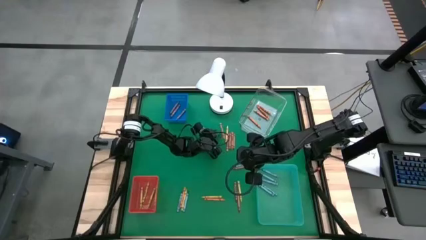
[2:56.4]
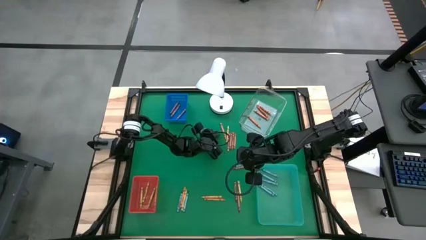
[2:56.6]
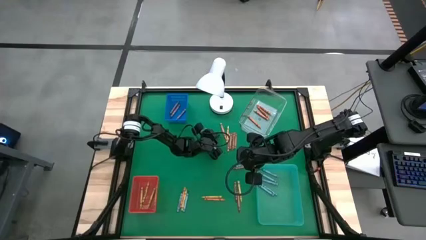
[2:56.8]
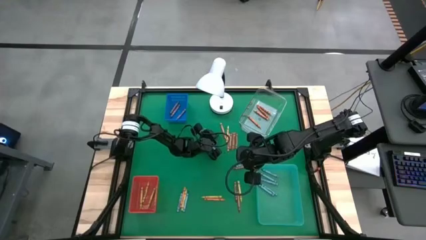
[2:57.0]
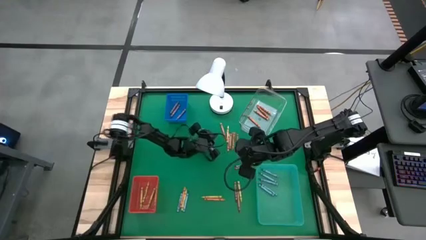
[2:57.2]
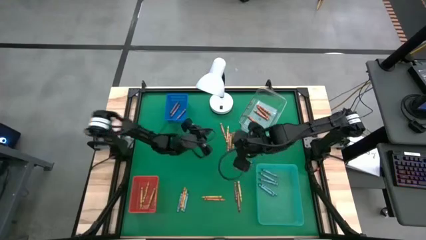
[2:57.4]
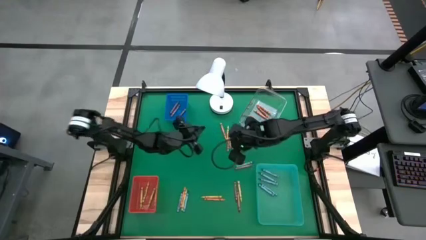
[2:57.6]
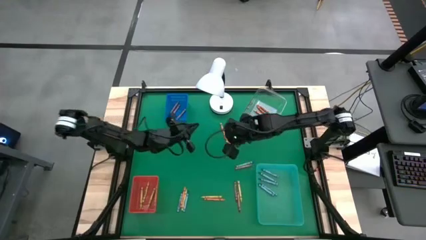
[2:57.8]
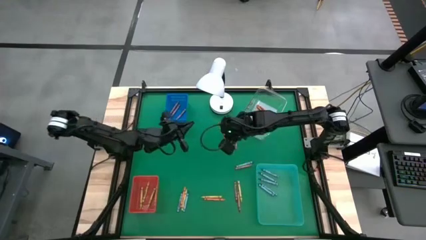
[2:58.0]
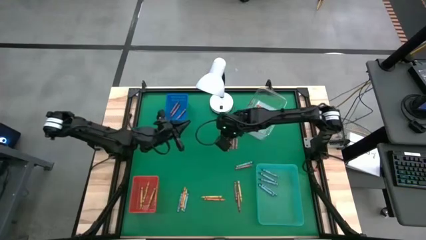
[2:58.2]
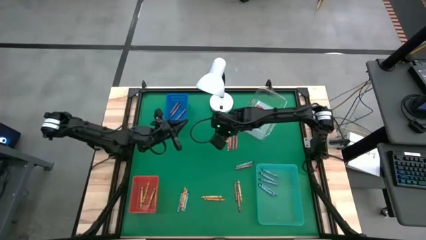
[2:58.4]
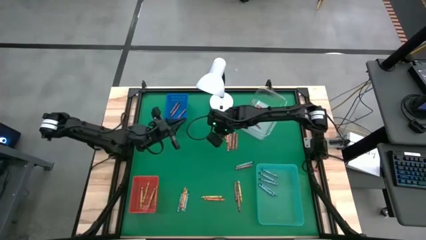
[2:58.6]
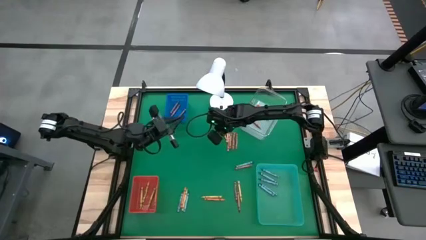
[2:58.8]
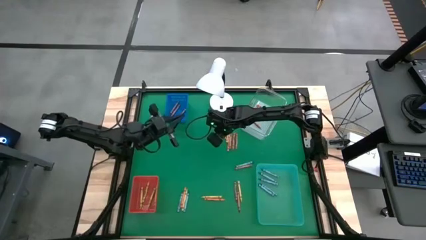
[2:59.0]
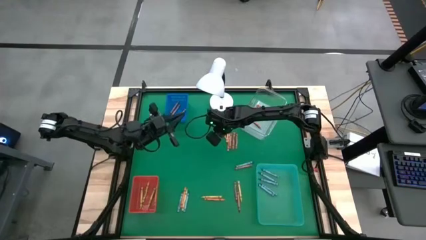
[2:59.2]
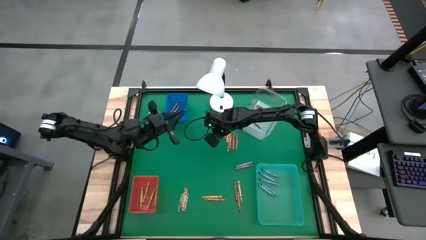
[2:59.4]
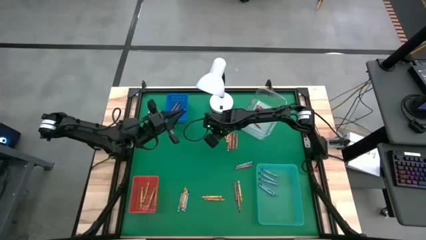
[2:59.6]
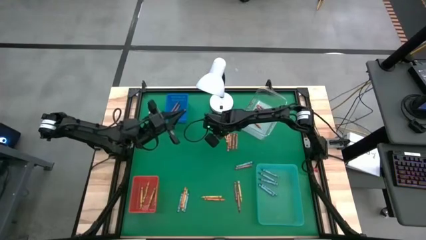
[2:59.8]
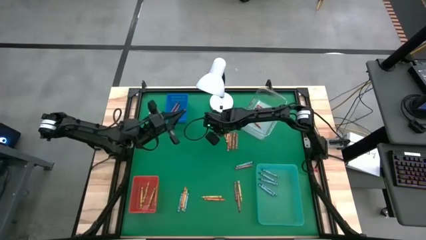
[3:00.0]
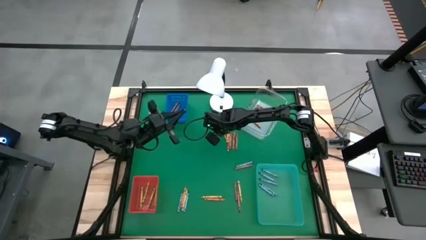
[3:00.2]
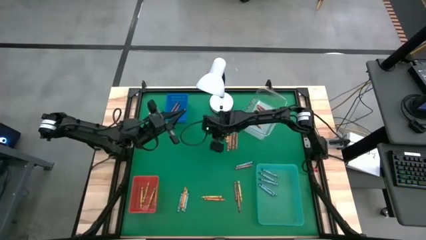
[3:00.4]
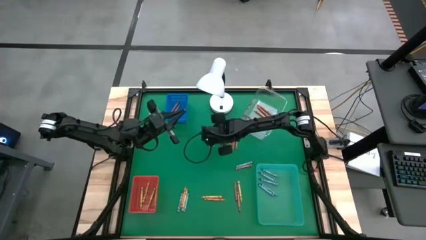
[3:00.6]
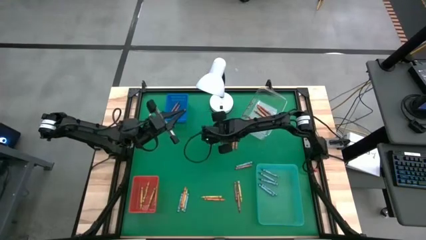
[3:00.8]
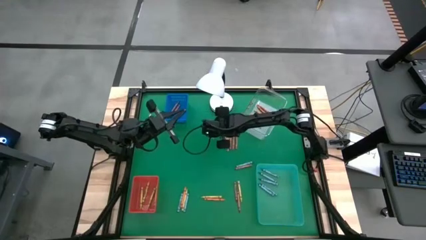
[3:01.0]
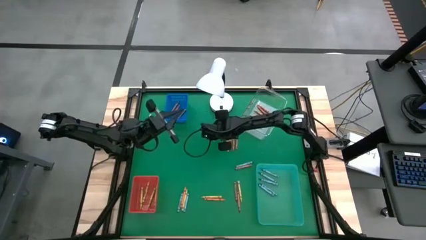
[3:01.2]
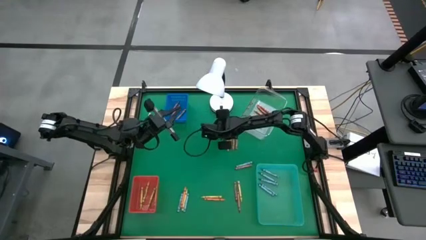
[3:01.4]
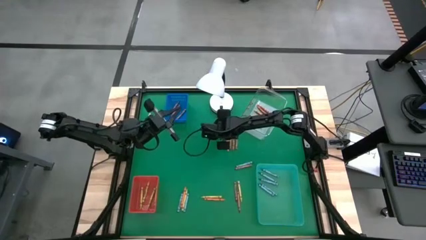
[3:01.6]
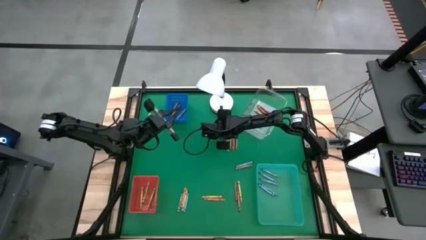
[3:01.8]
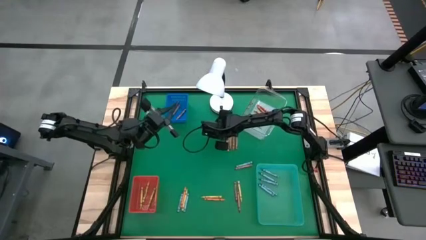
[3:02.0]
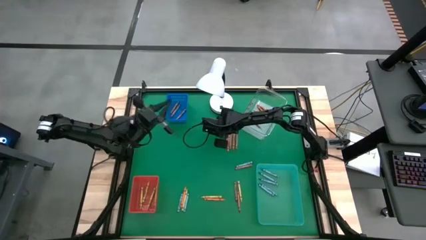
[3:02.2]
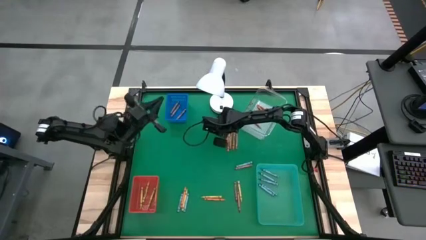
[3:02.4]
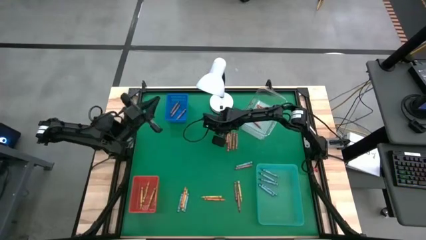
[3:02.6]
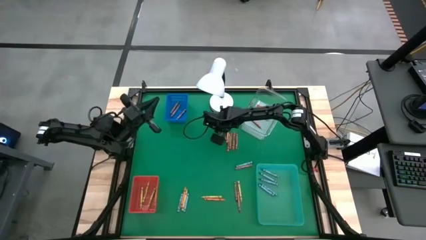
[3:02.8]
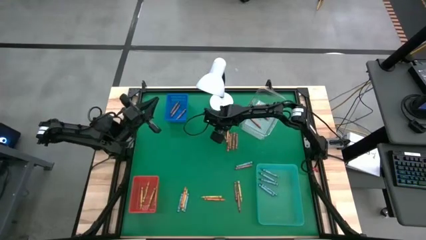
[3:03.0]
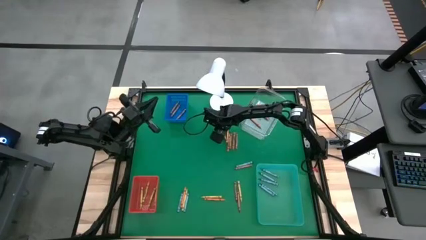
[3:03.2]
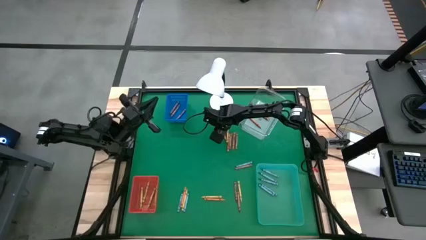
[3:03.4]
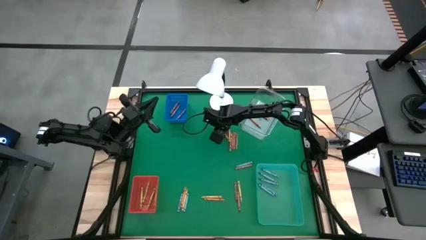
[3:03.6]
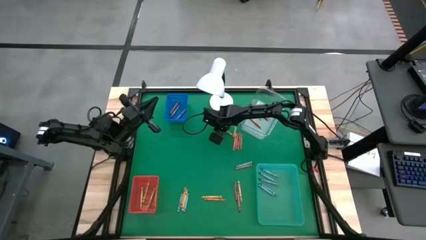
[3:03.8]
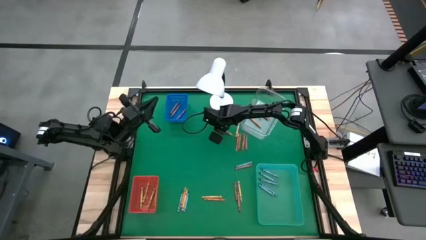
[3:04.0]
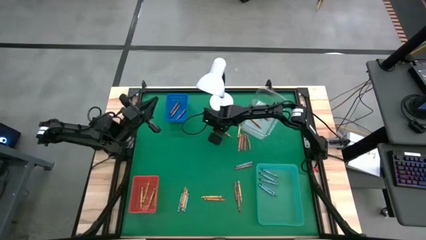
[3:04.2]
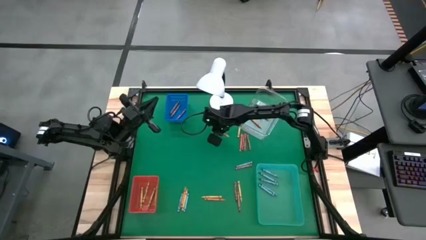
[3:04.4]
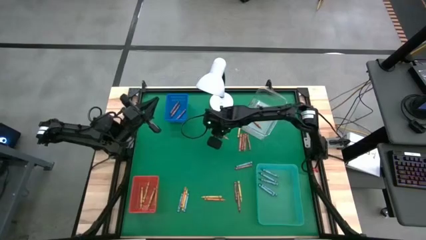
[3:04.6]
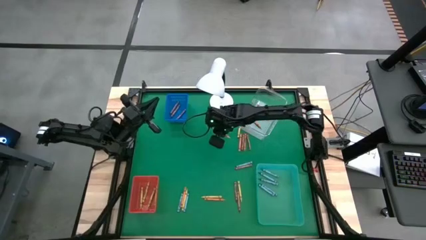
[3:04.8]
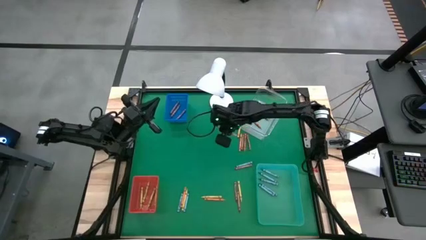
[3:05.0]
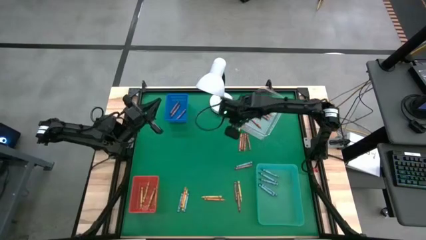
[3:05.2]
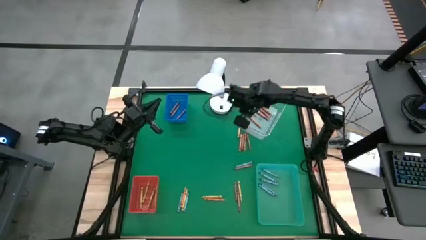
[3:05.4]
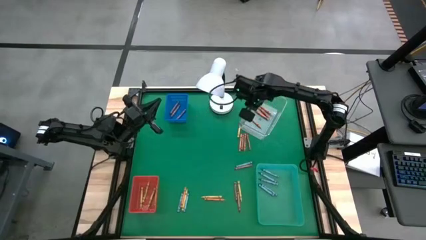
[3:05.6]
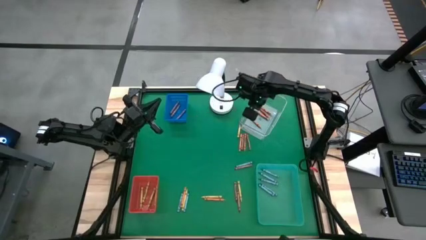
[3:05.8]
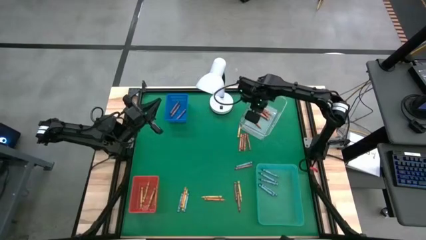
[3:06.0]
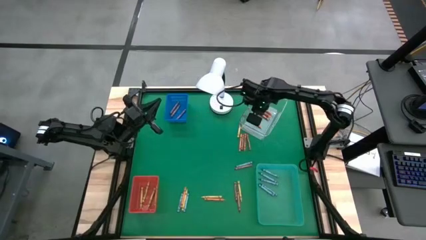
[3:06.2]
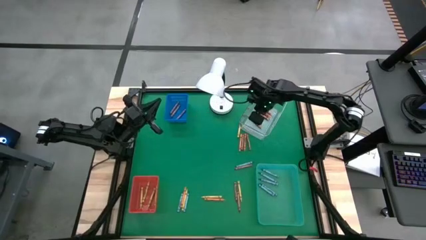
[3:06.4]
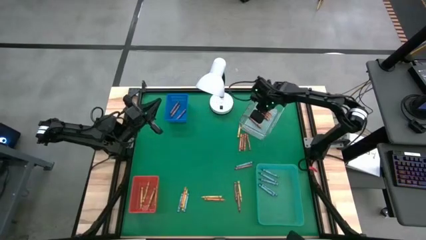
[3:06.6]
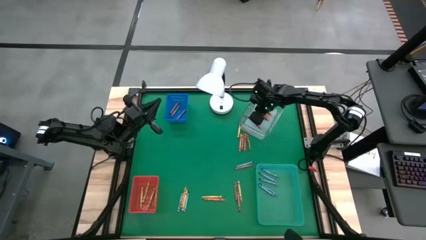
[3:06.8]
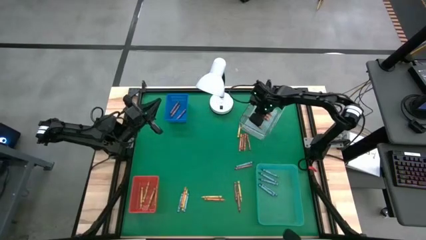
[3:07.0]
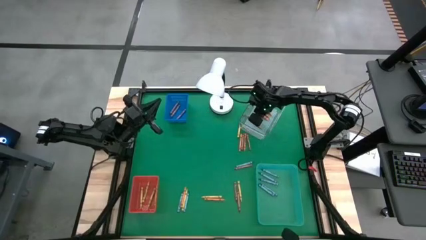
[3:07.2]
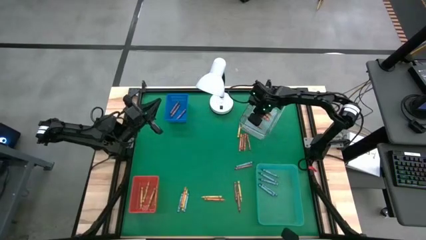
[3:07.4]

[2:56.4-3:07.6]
Task: Sort crayons
Put the orange crayon into the transparent bin
